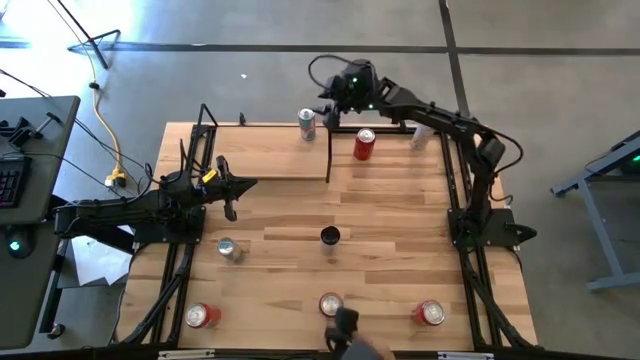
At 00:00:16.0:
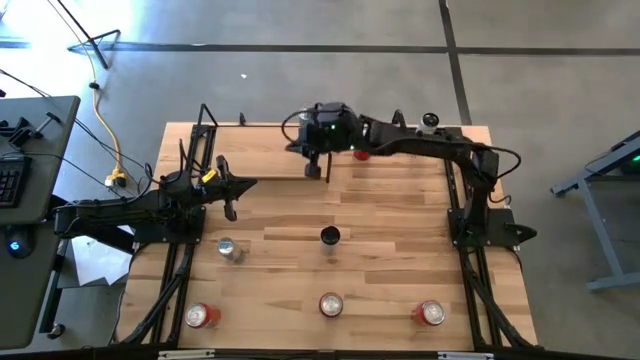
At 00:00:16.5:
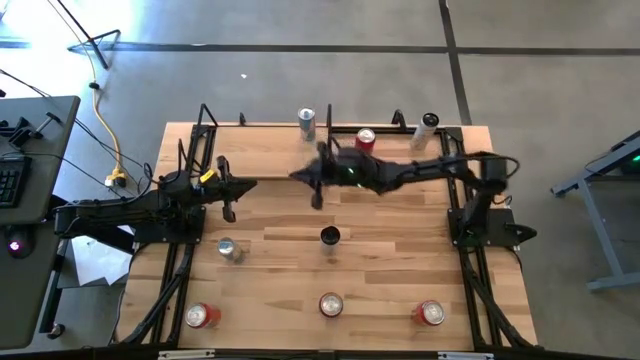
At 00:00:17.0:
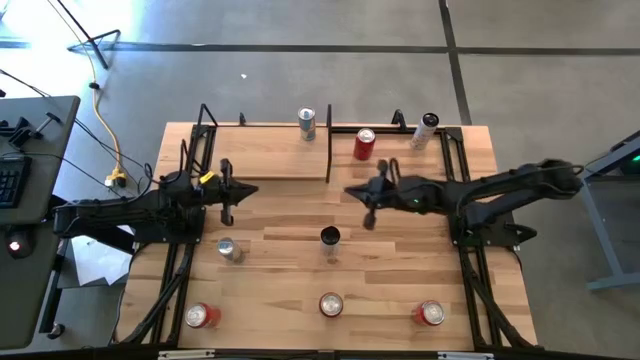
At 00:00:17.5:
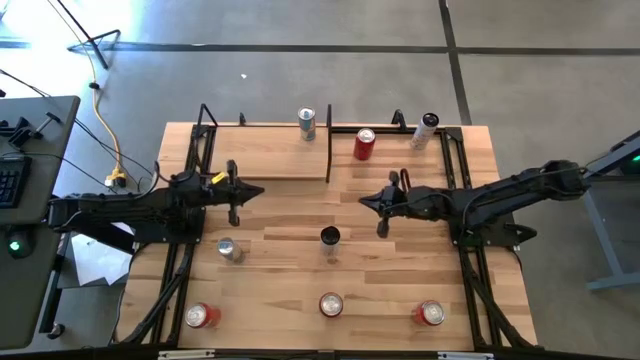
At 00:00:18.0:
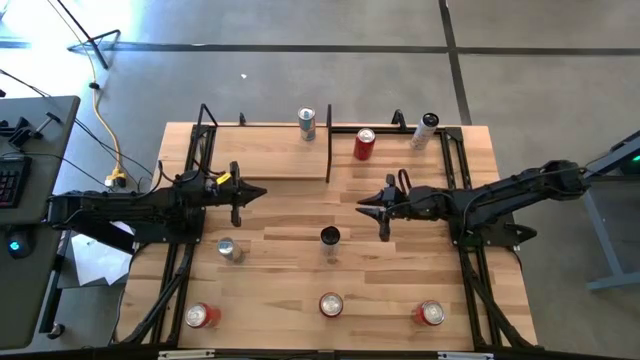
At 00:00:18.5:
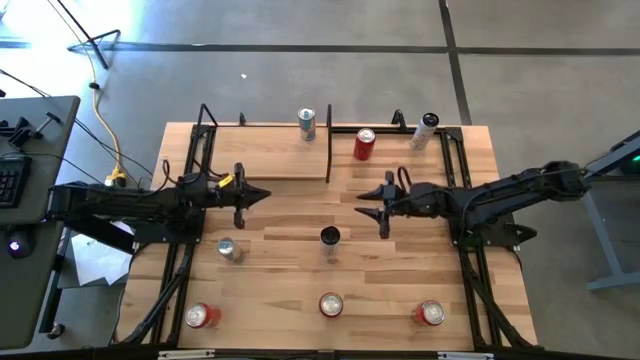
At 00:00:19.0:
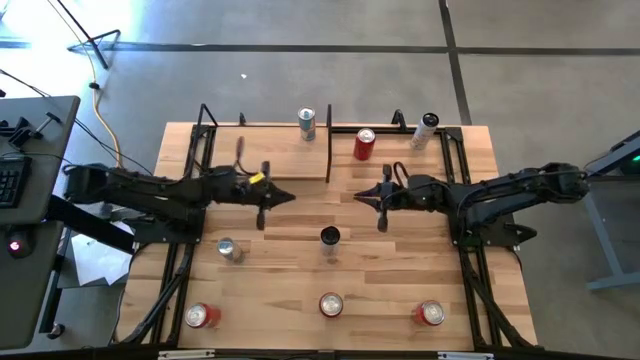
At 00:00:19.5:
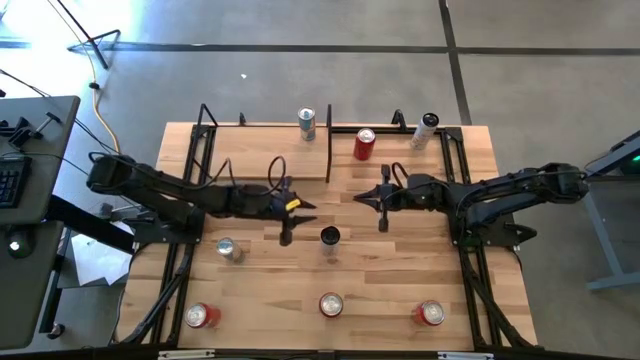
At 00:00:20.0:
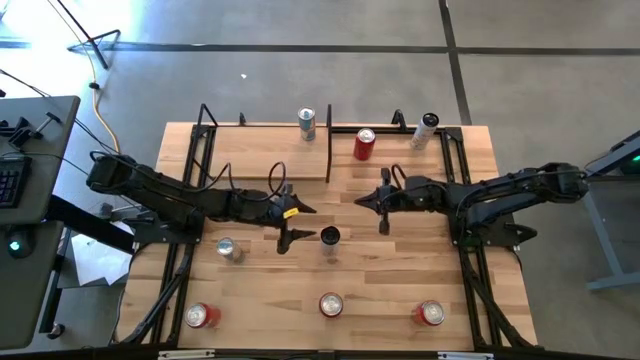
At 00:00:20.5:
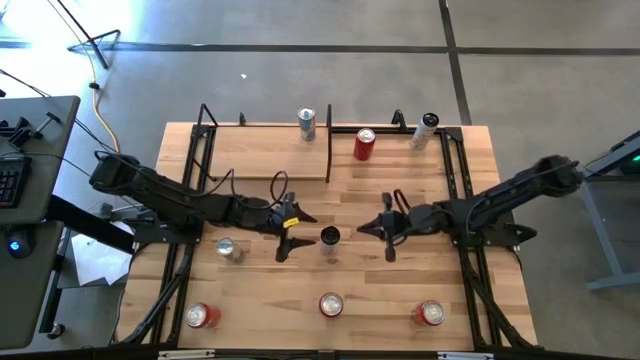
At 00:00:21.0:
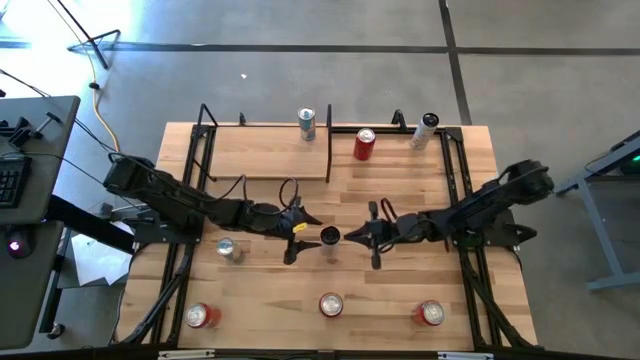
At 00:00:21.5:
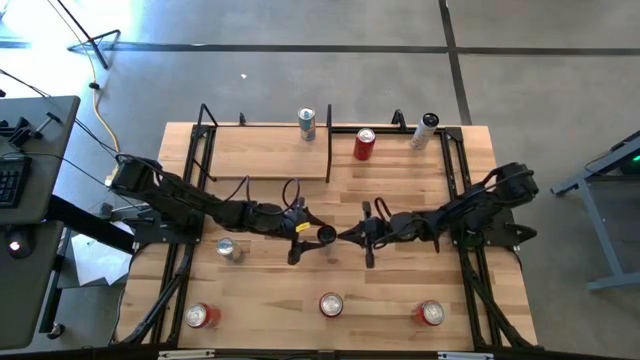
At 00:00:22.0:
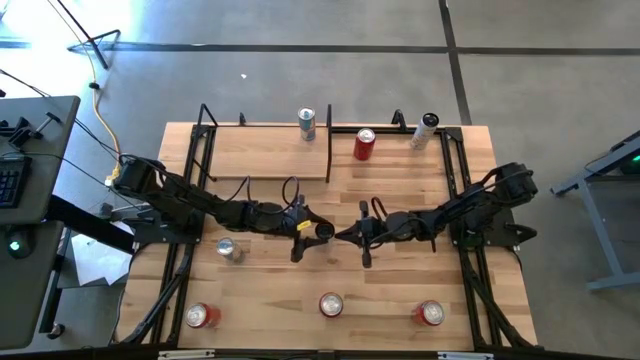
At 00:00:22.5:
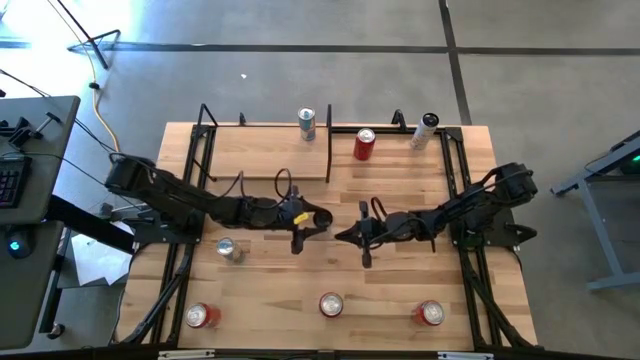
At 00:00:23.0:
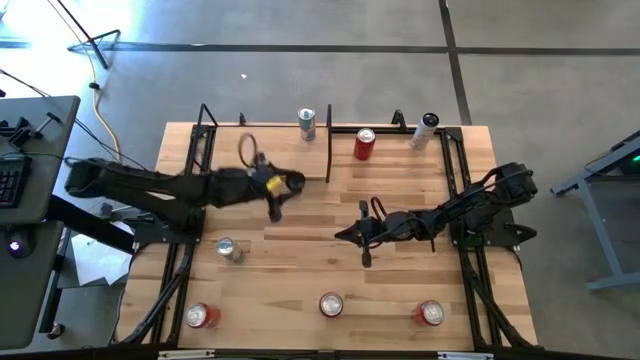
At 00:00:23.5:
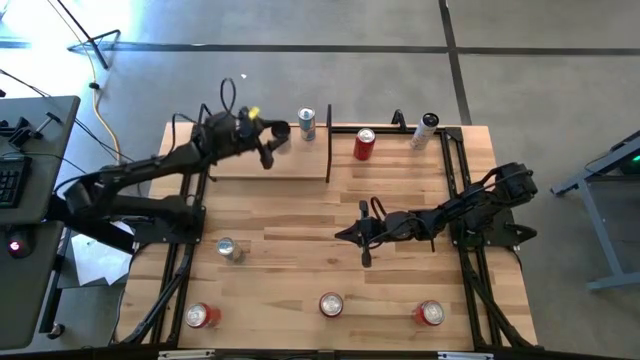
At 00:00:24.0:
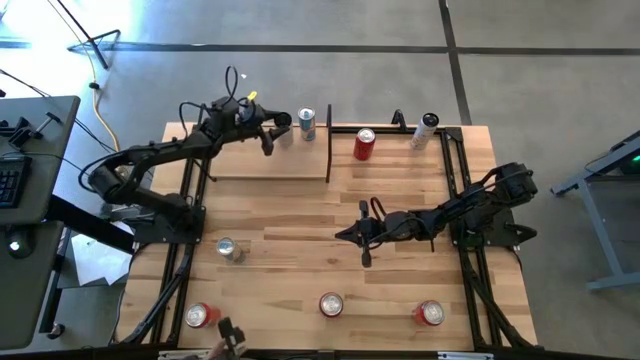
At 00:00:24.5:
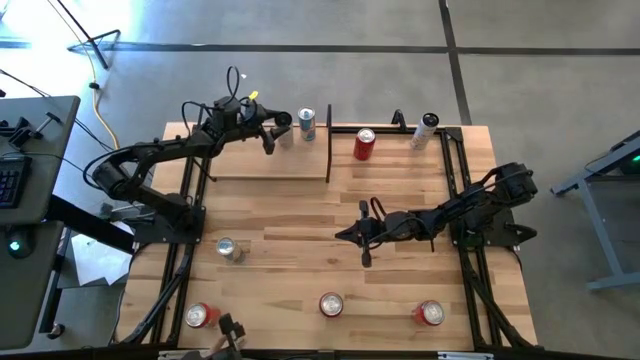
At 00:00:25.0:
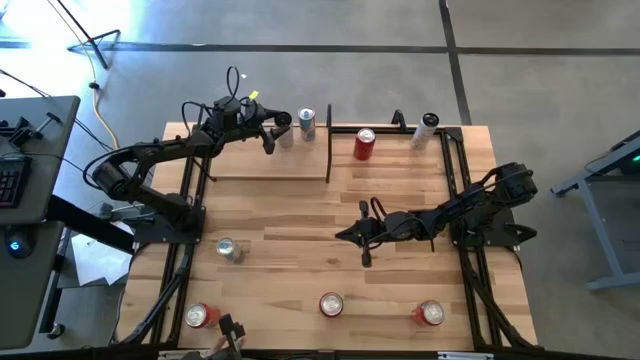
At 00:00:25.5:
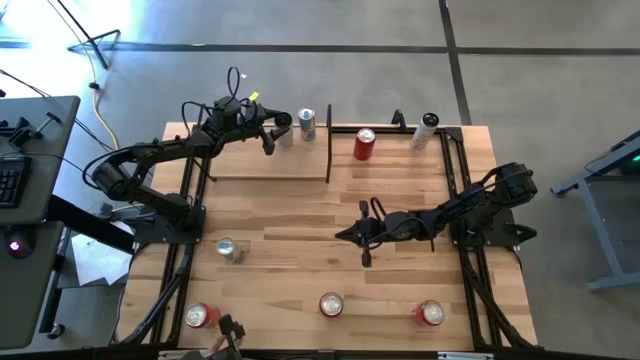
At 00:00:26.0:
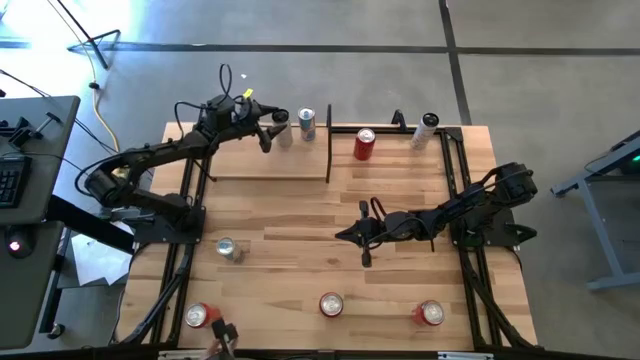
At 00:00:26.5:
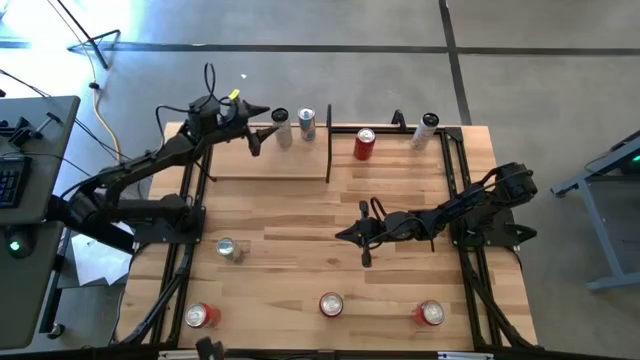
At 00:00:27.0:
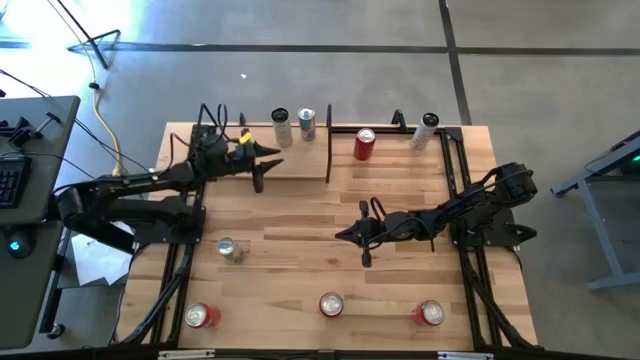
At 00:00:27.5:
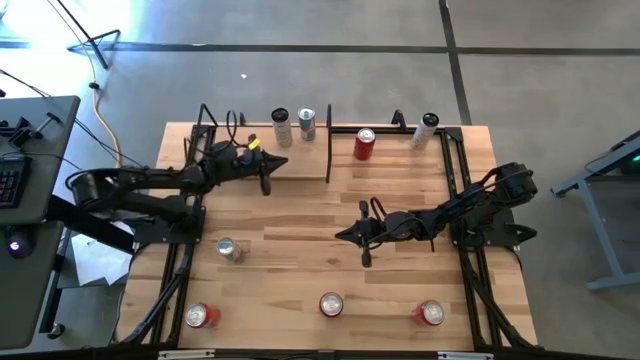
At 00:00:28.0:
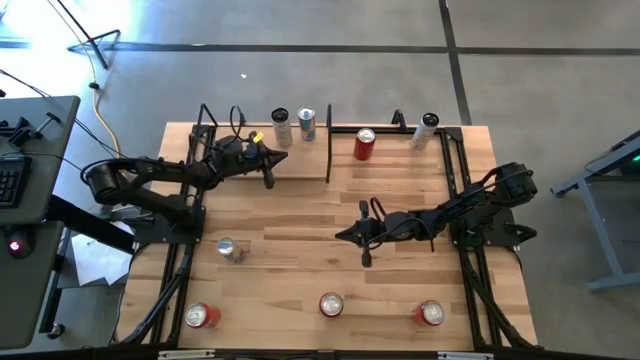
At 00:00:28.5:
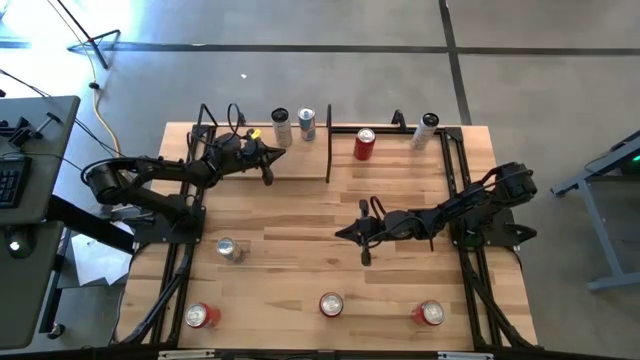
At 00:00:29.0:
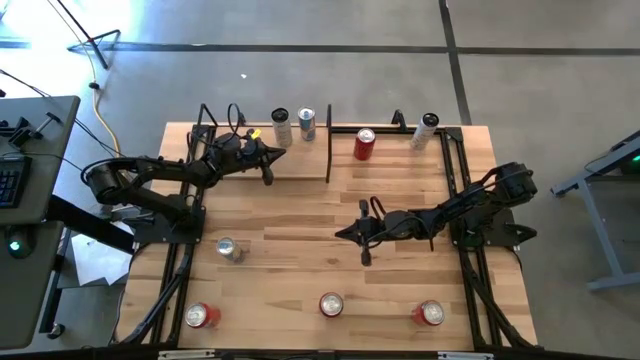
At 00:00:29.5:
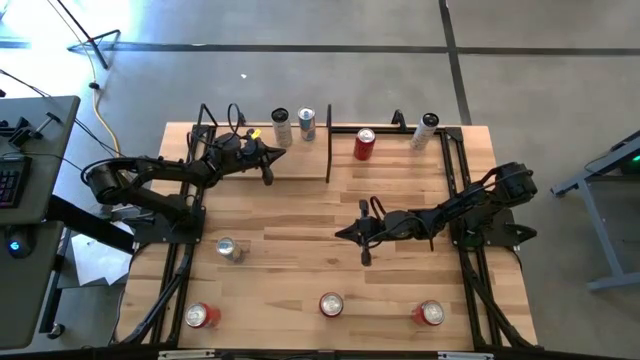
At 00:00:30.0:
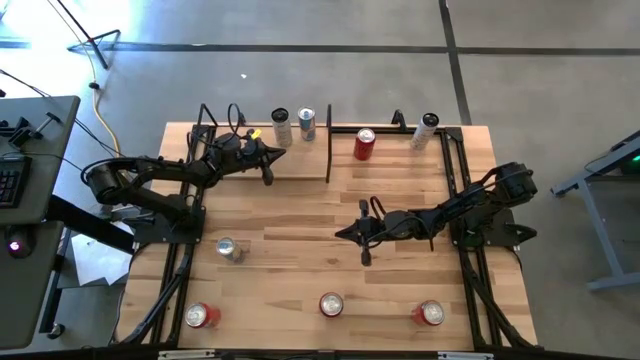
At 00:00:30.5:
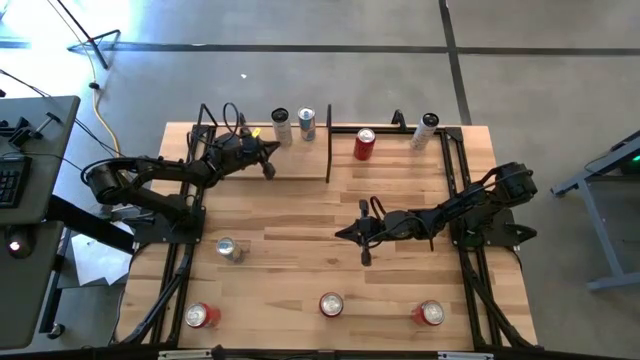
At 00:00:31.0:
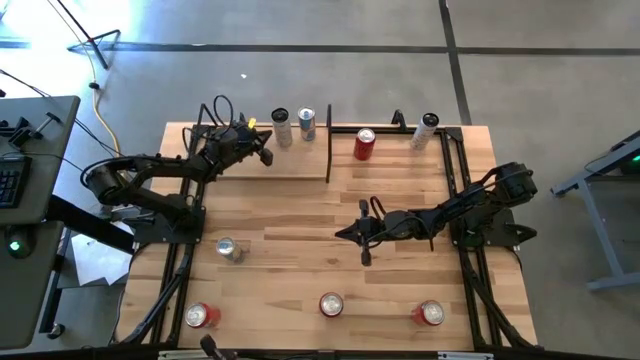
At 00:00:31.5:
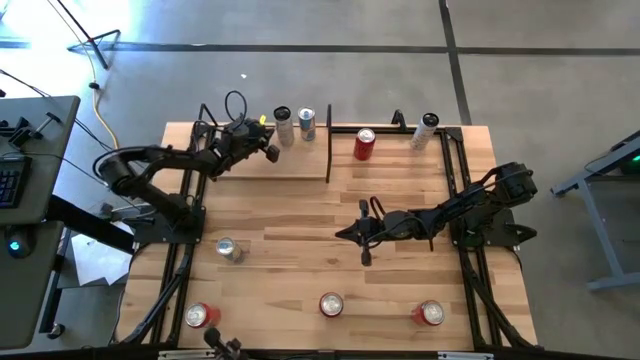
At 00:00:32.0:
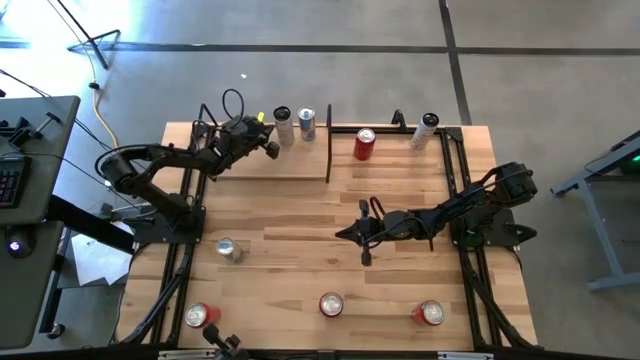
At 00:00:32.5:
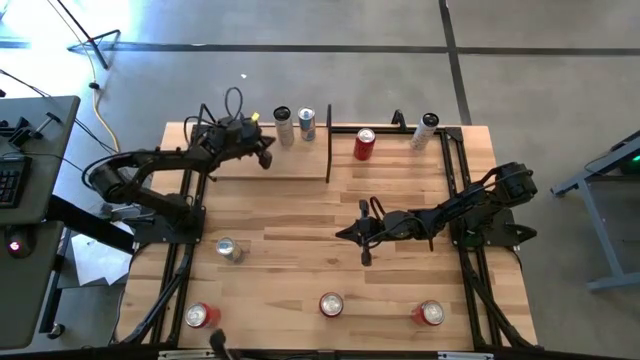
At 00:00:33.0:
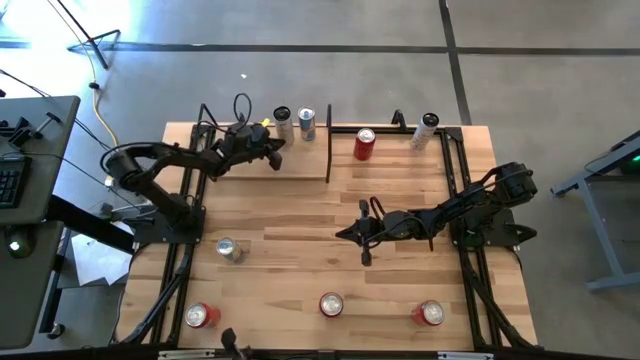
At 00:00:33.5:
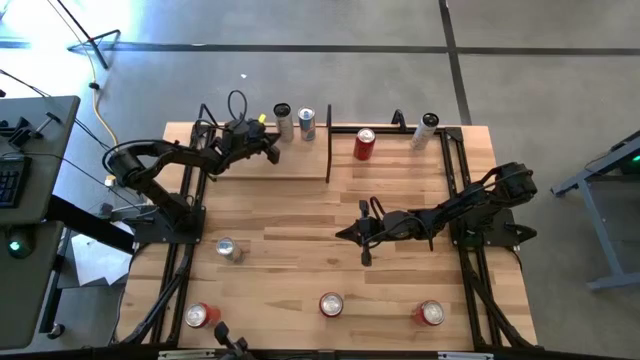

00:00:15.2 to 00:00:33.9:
Task: Place canned beverage on shelf
Put the bottom white-yellow soda can on the shelf
